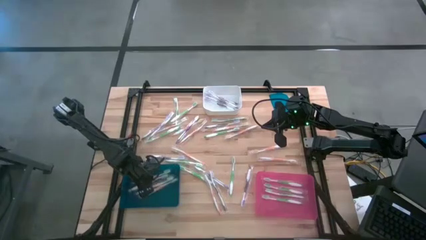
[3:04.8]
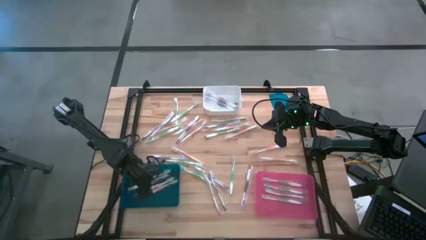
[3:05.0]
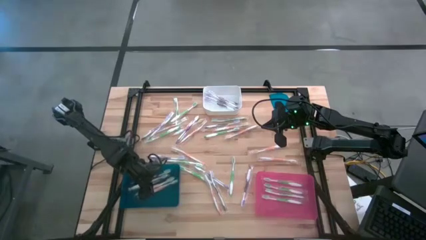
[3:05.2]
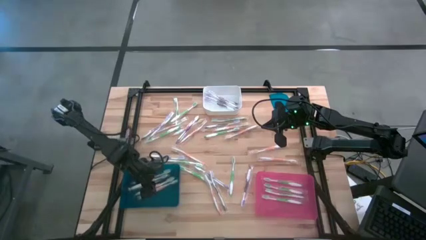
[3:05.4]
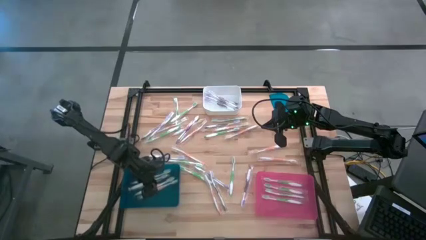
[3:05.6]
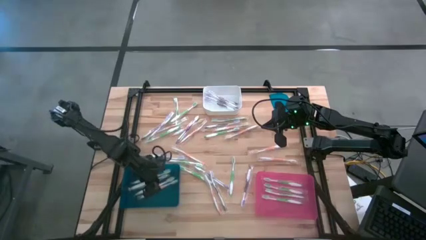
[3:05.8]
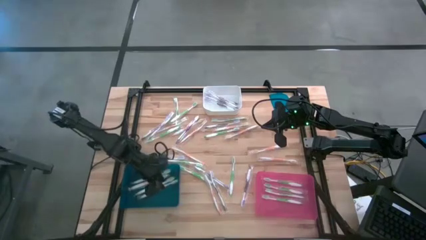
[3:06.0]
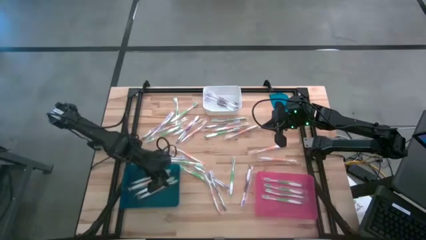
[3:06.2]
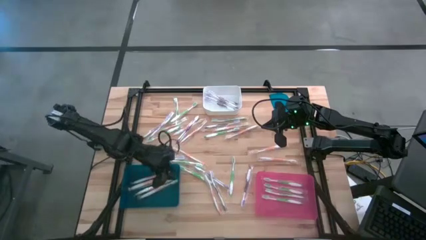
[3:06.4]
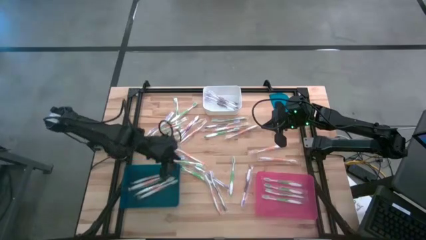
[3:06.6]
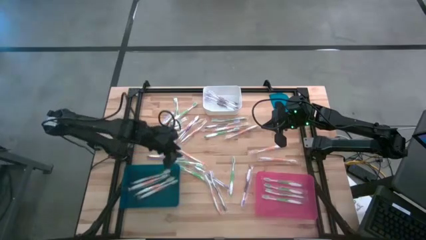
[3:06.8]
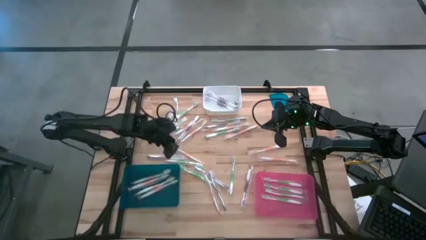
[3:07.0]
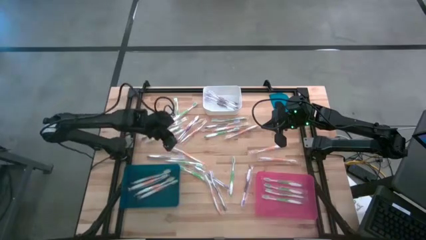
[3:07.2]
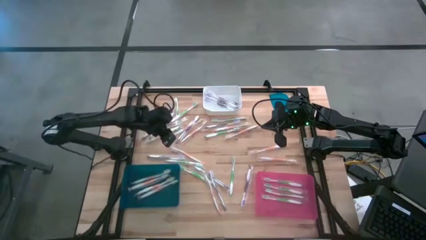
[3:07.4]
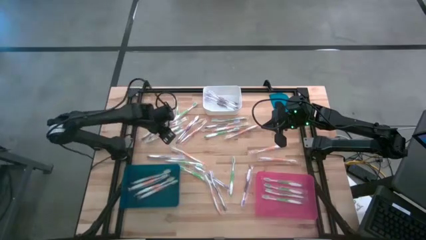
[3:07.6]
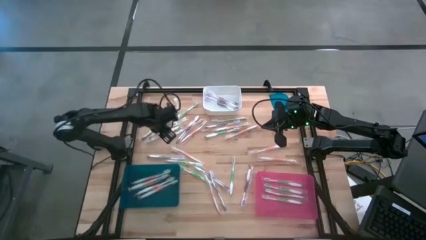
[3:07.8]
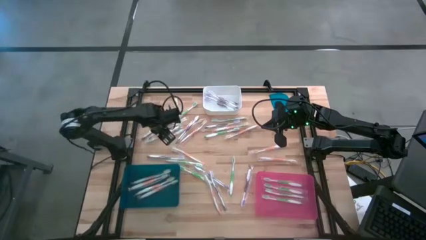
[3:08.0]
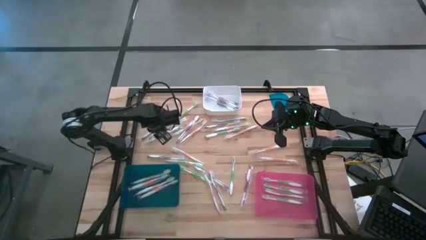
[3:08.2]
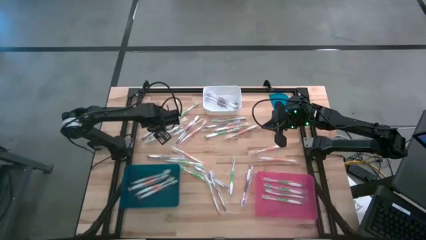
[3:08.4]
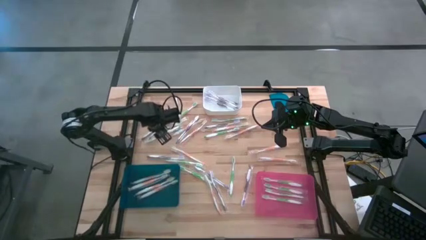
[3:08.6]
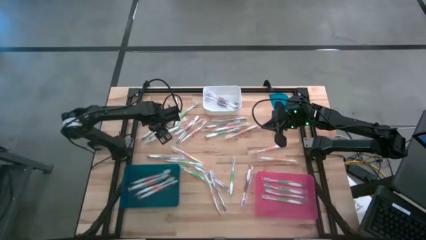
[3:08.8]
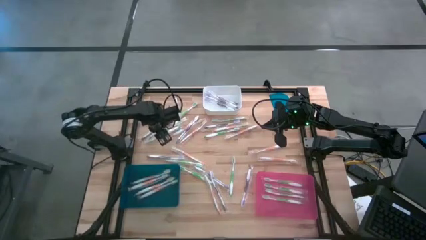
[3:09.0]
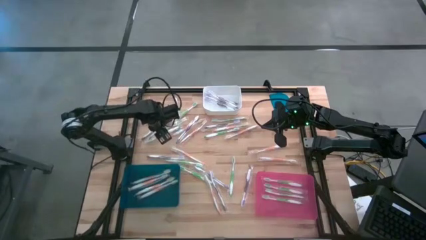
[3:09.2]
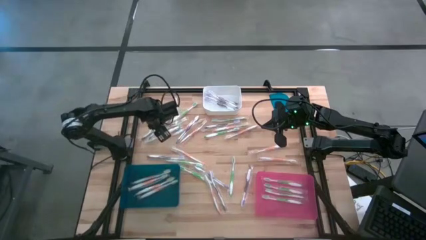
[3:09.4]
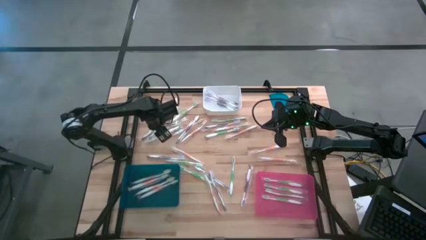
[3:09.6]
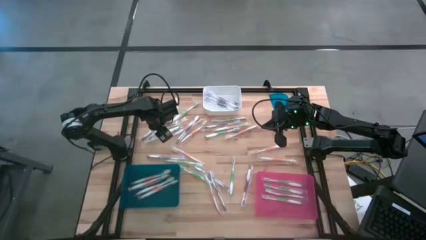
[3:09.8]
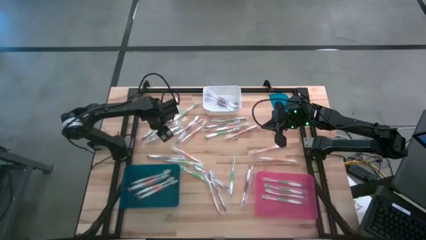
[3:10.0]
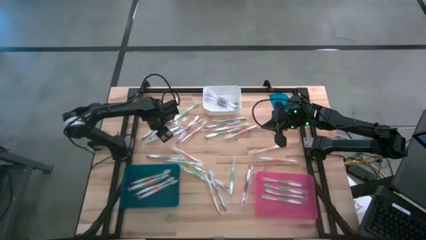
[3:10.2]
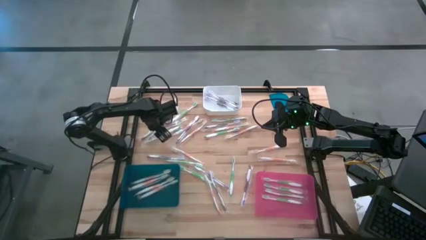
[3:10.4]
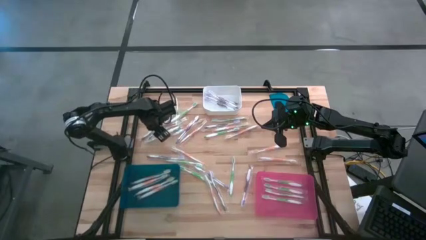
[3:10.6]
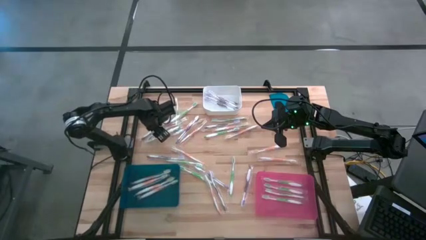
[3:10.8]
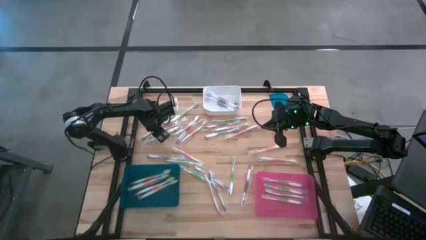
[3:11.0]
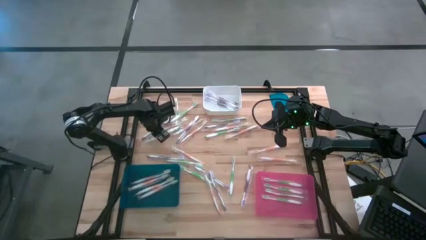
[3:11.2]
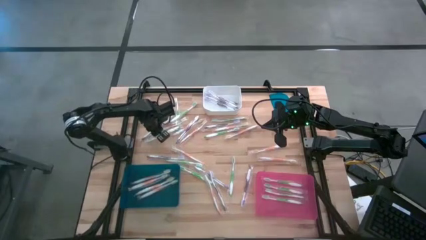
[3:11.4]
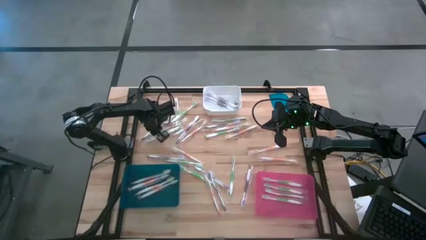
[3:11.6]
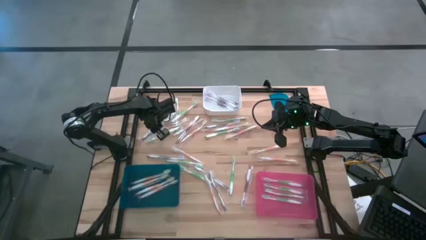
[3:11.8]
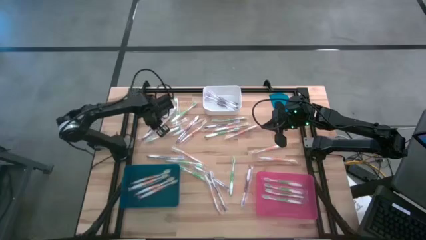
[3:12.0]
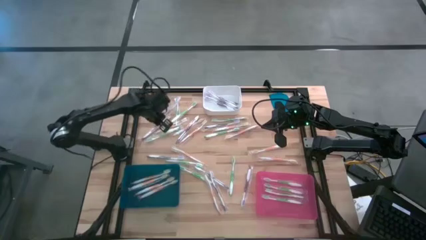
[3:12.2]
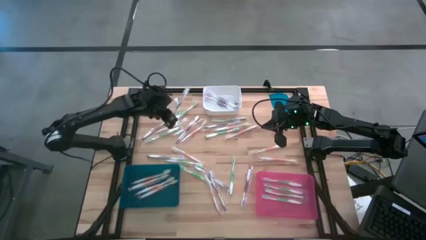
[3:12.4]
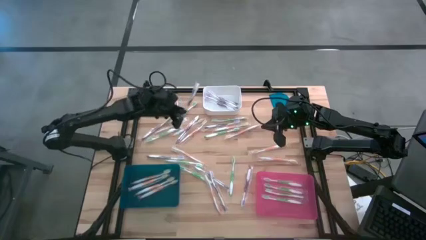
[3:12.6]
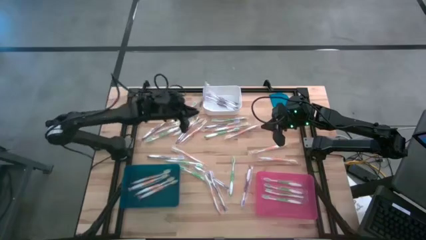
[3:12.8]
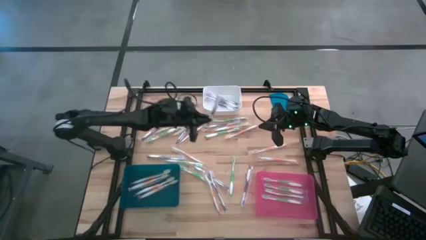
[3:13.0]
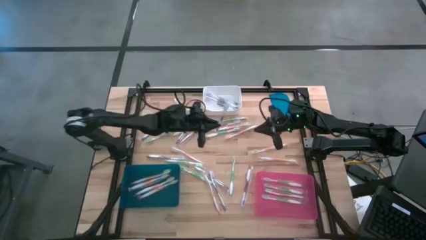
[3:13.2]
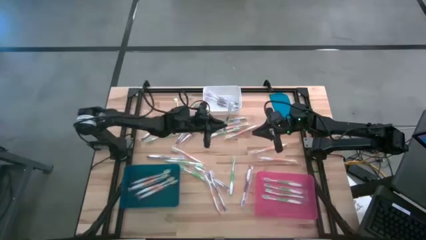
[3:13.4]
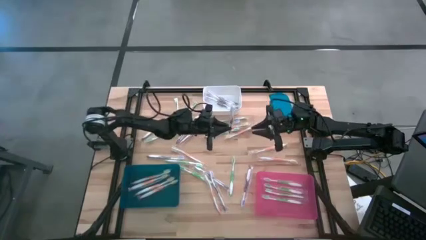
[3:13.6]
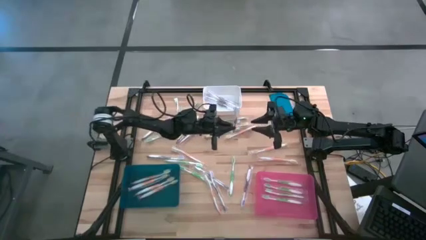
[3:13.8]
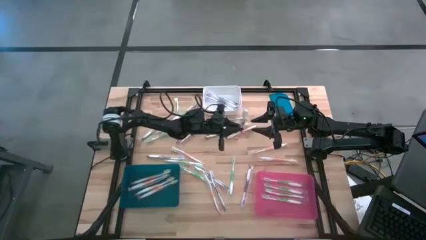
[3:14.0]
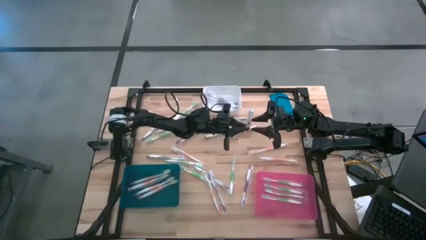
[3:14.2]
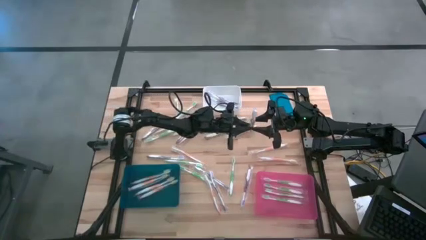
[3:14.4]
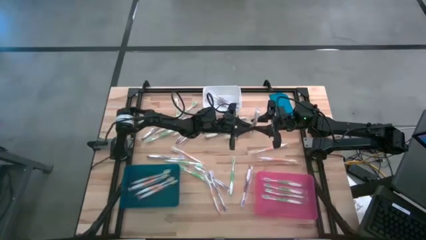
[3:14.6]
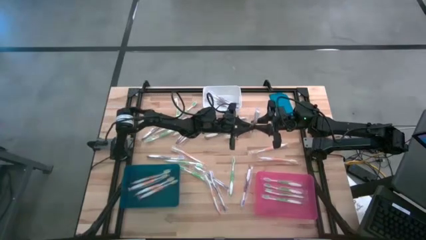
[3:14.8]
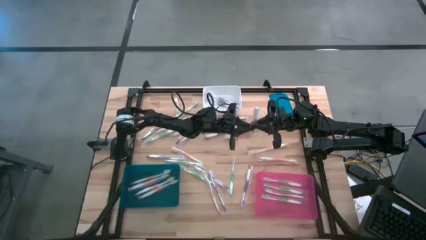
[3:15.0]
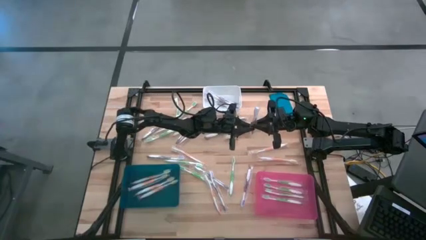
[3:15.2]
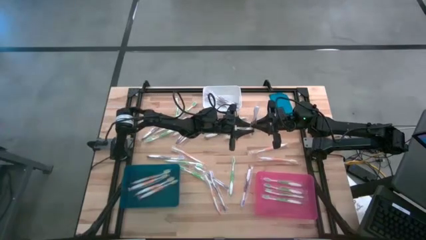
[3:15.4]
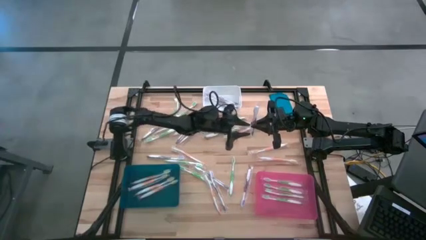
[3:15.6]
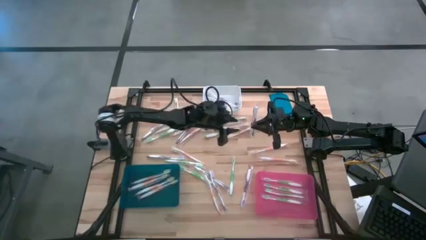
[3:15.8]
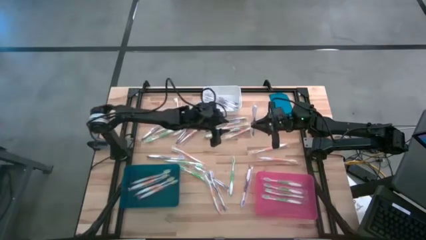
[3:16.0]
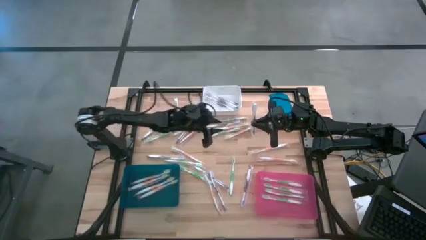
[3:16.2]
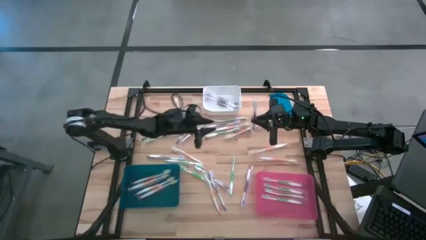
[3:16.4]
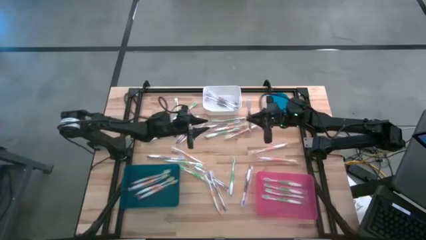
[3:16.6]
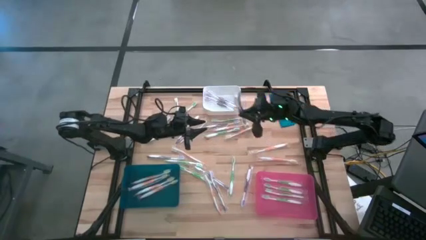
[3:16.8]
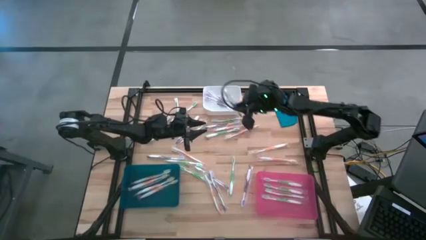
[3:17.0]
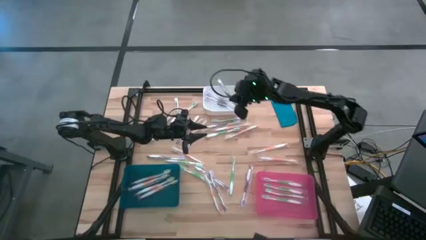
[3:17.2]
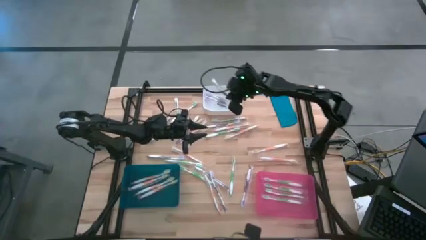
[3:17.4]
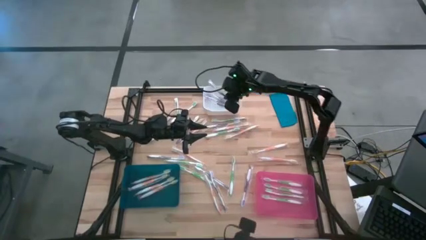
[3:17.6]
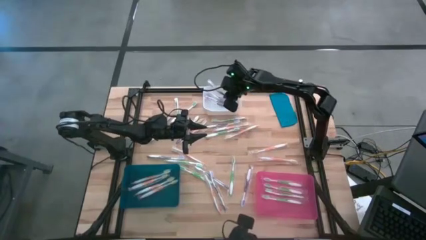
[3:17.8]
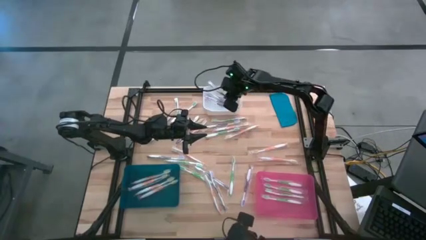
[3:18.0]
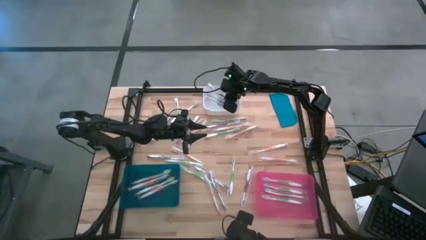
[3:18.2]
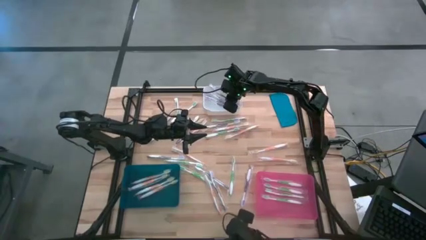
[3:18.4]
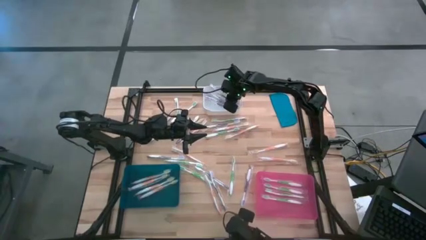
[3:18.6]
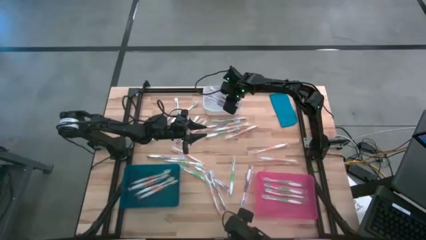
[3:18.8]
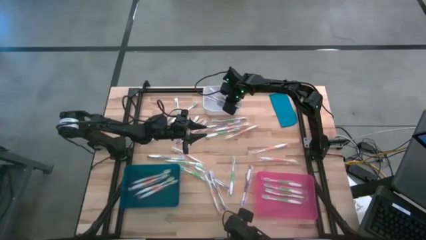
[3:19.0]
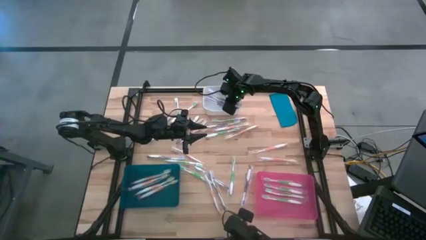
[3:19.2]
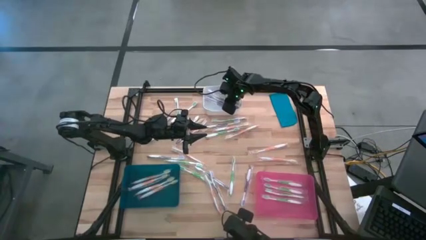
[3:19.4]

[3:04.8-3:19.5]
Task: Pick & Place Toothbrushes
Put the violet toothbrush into the white bin
